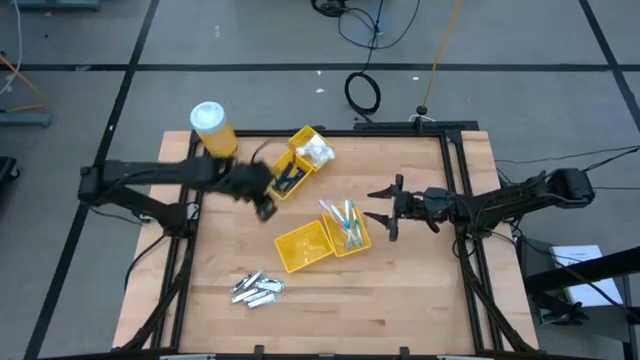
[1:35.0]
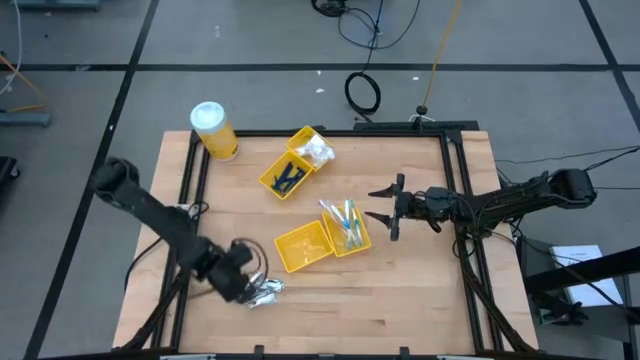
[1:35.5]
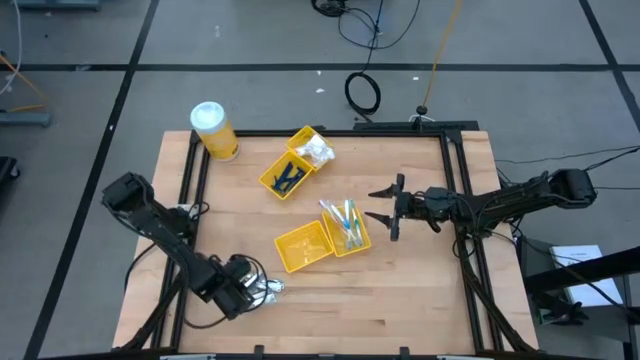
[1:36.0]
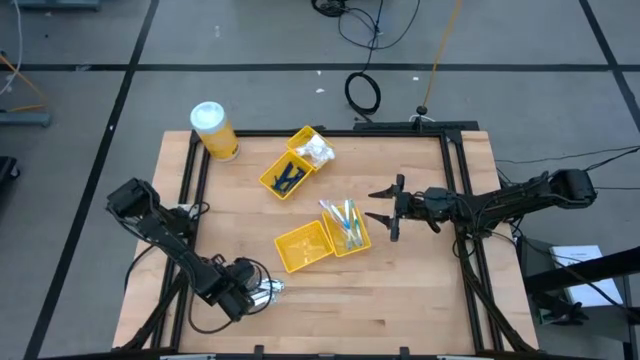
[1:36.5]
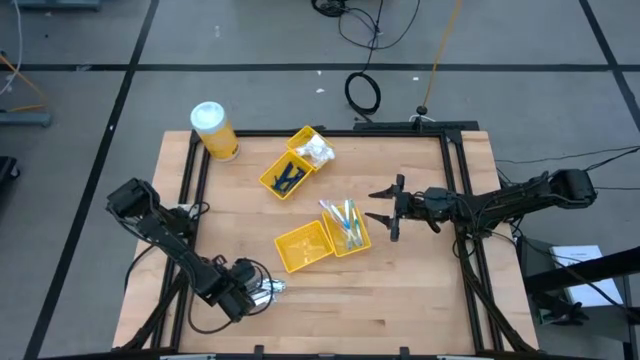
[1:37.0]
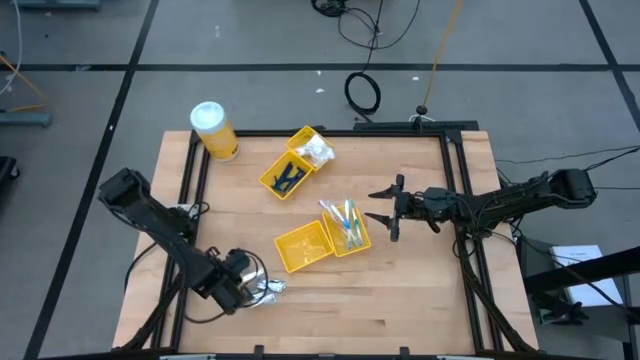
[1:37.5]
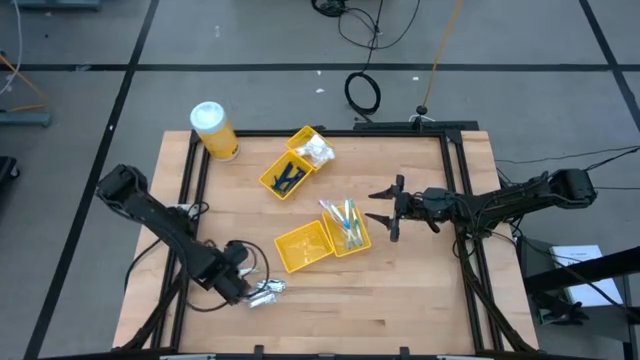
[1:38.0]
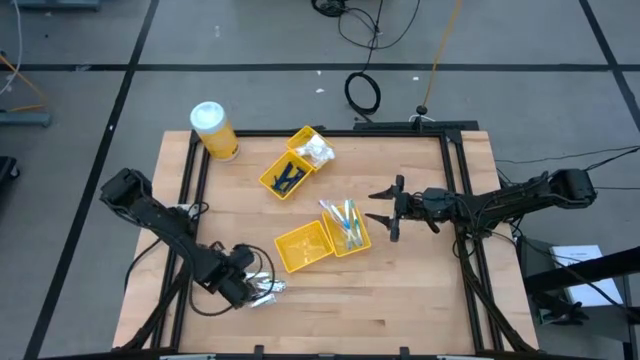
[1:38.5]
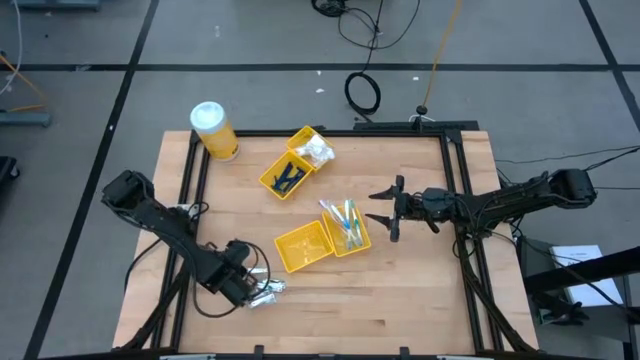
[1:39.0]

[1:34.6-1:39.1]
Task: Pick & Place Travel size toiletries
Put the silver nail cutter into the bottom left yellow basket

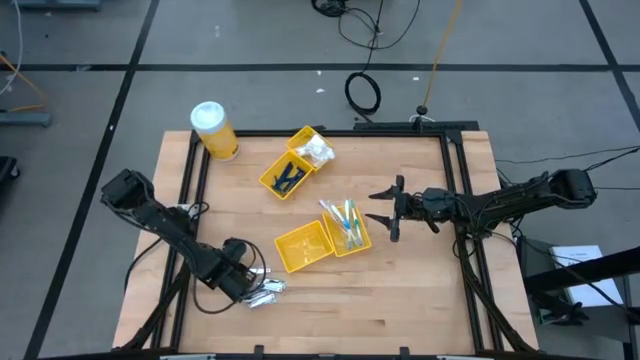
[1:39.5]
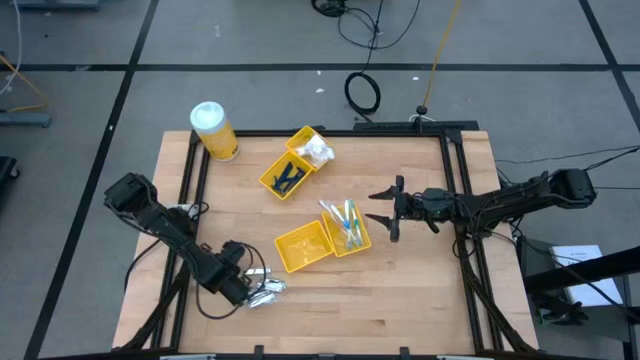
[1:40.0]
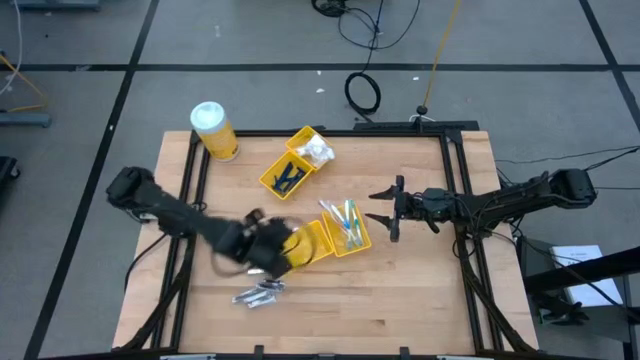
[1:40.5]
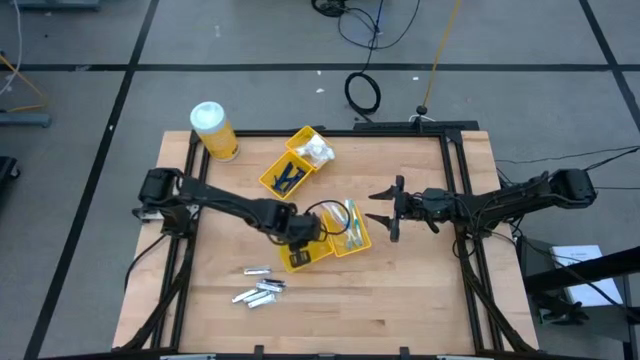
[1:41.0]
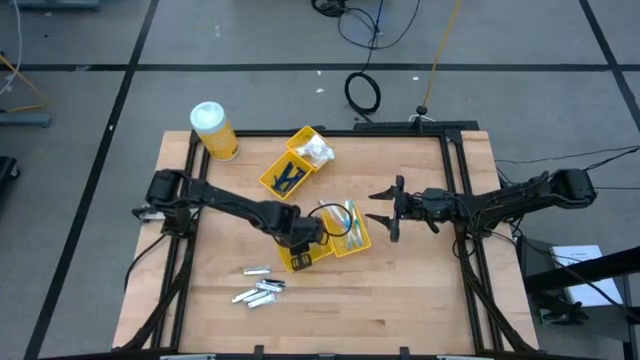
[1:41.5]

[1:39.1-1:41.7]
Put the silver nail cutter into the bottom left yellow basket

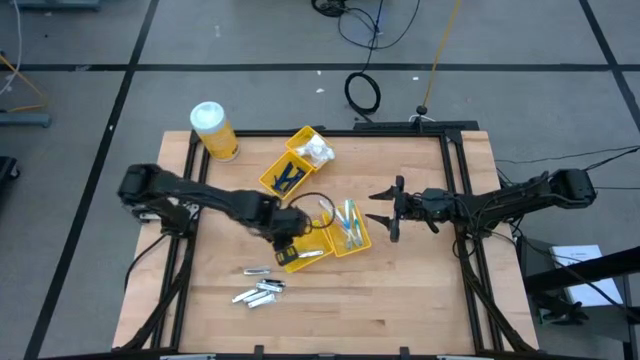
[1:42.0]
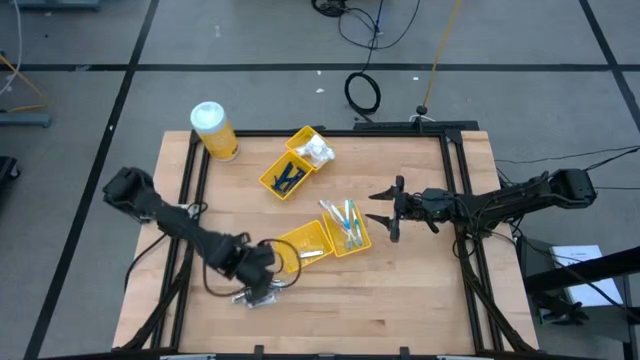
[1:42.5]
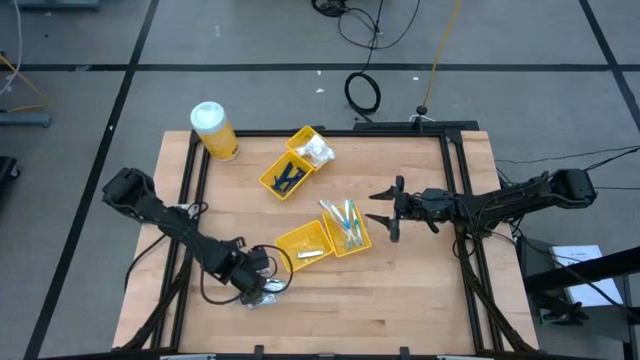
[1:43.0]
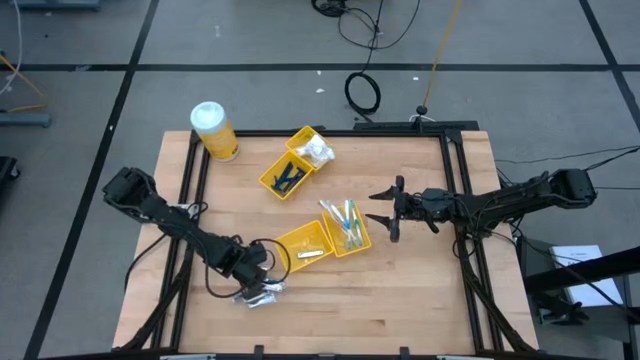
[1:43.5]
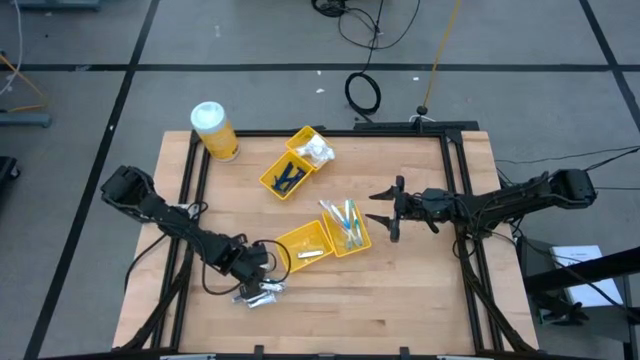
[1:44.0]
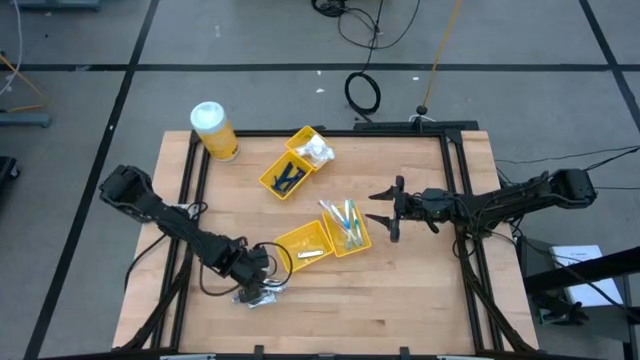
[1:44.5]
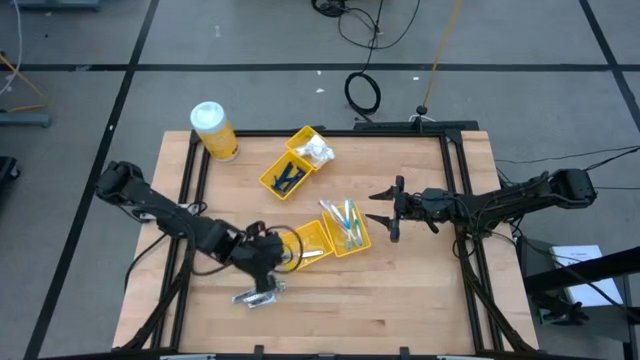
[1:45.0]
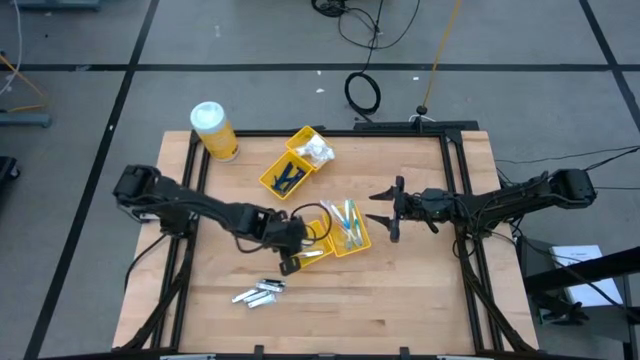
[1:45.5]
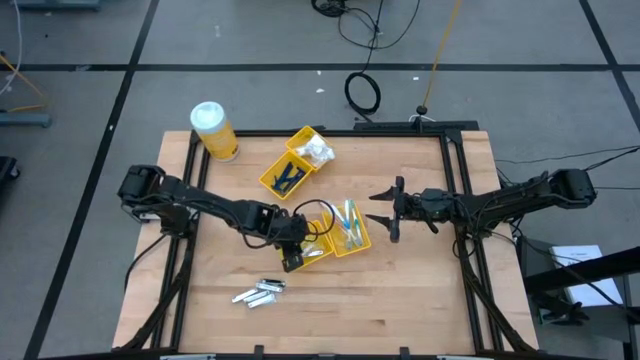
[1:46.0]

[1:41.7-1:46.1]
Put the silver nail cutter into the bottom left yellow basket

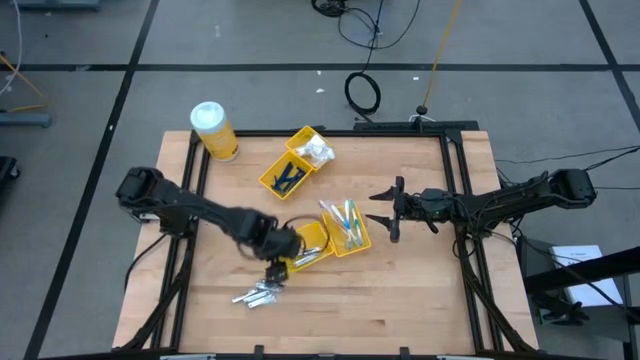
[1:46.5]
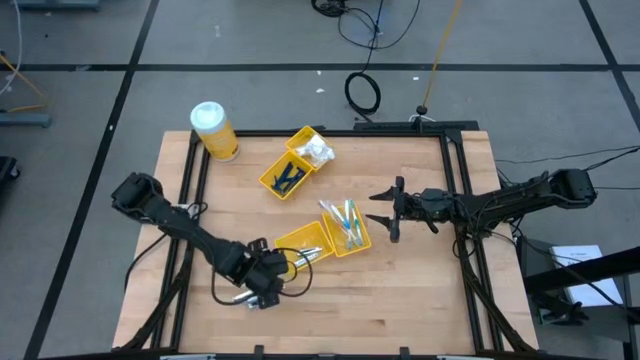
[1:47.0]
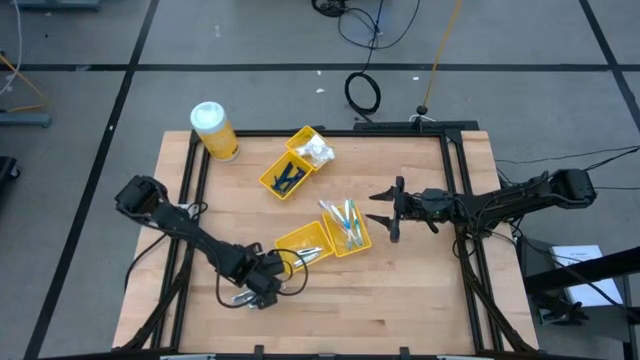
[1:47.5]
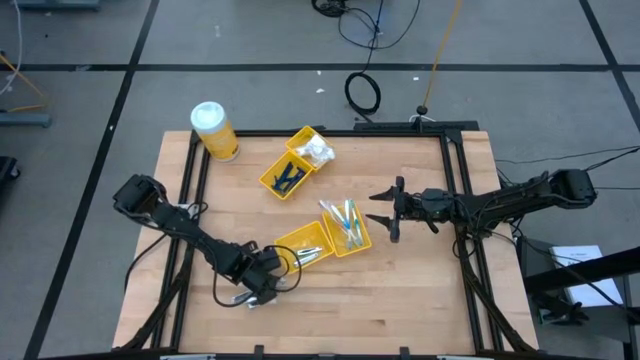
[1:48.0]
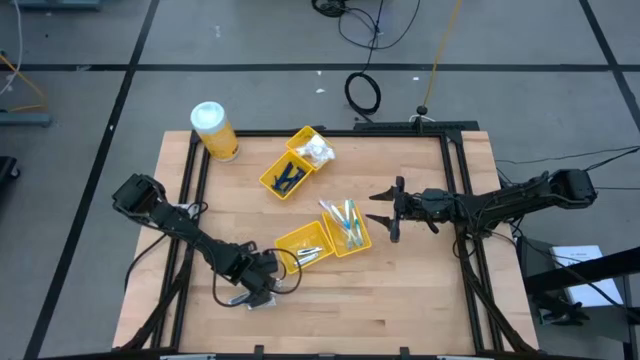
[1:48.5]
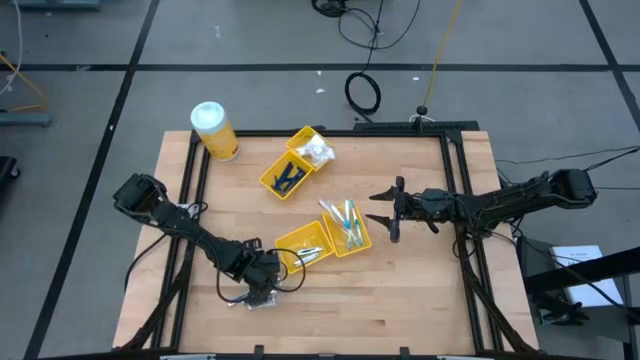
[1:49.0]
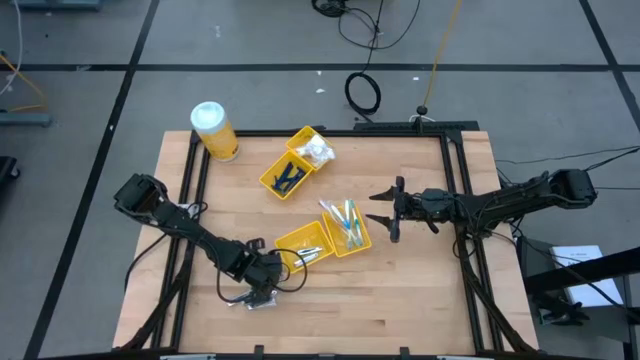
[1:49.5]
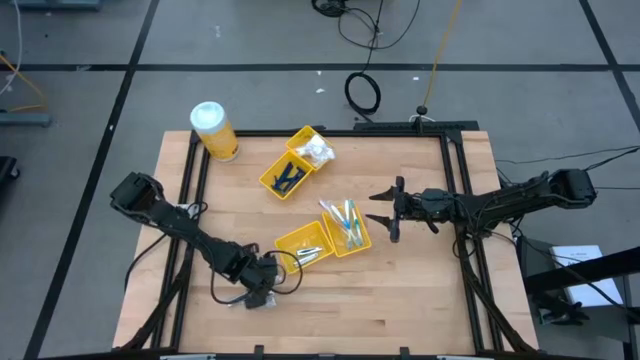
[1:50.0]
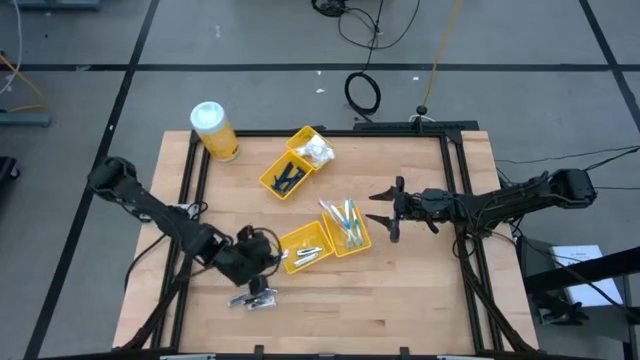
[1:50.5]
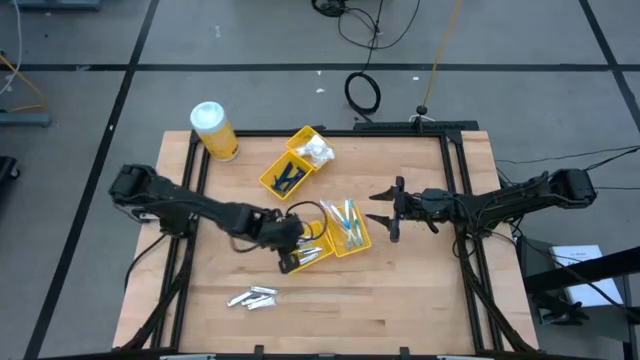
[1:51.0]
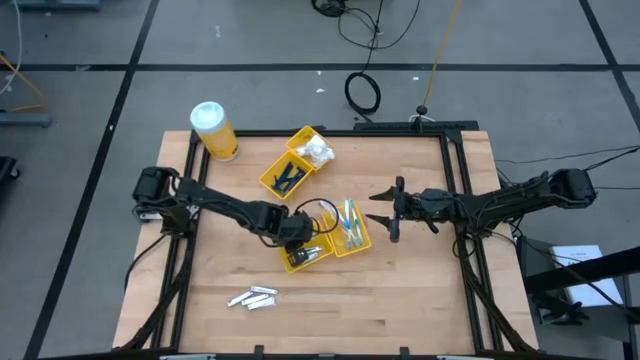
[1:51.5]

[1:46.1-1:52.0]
Put the silver nail cutter into the bottom left yellow basket

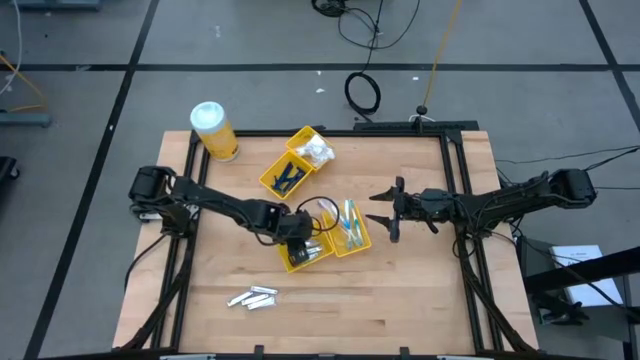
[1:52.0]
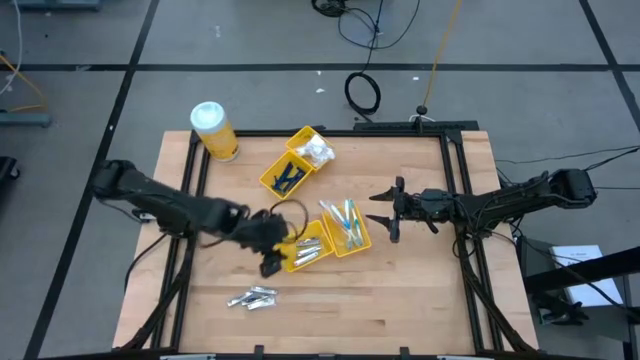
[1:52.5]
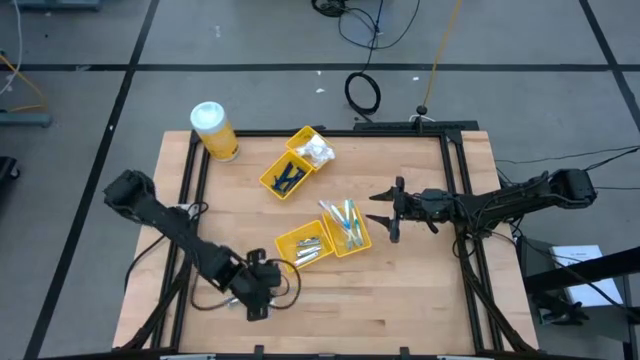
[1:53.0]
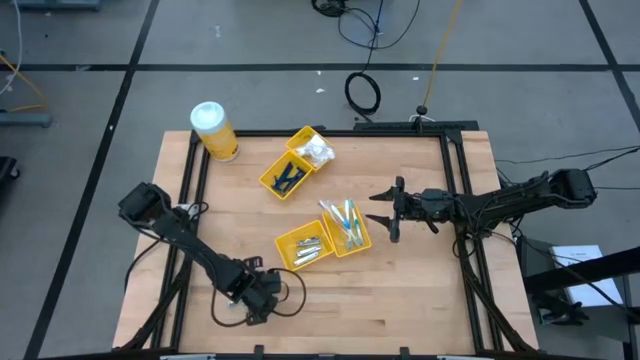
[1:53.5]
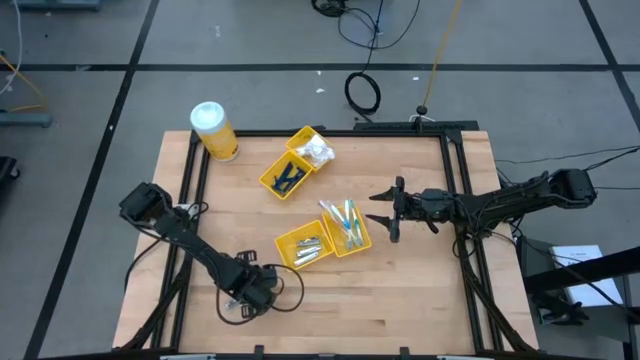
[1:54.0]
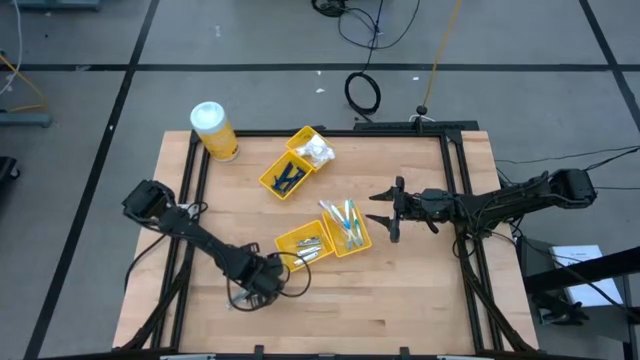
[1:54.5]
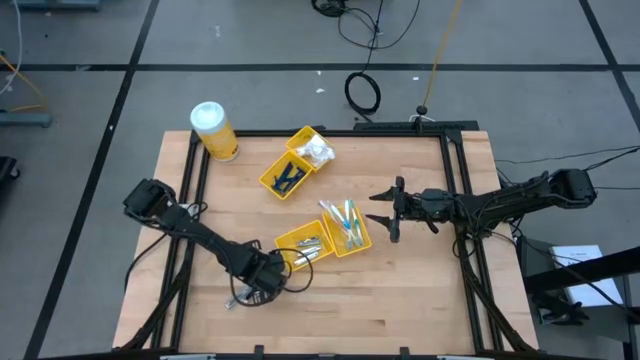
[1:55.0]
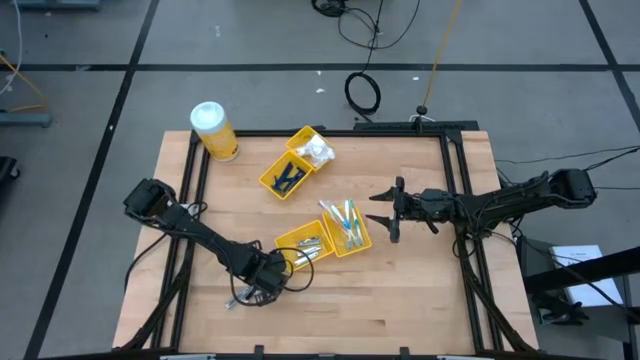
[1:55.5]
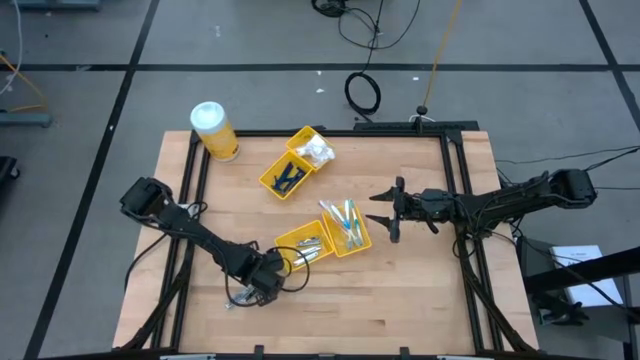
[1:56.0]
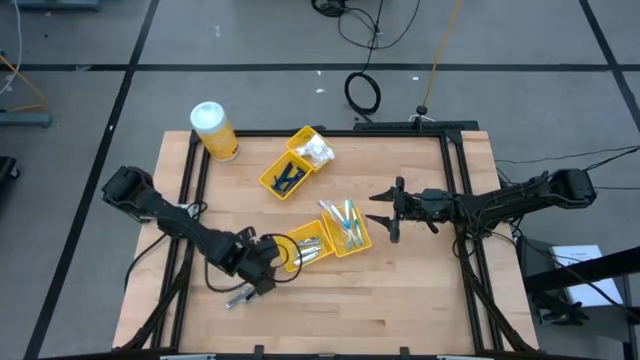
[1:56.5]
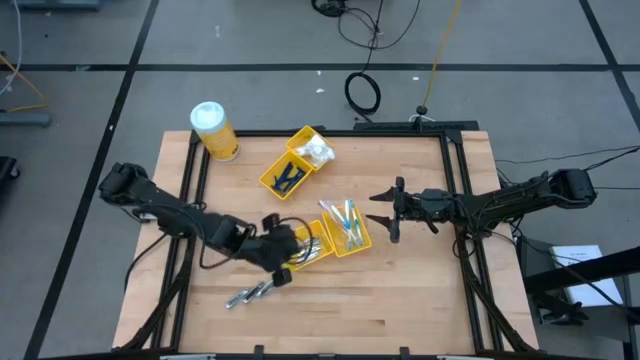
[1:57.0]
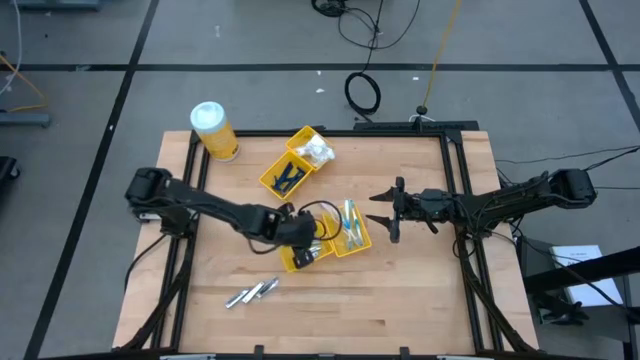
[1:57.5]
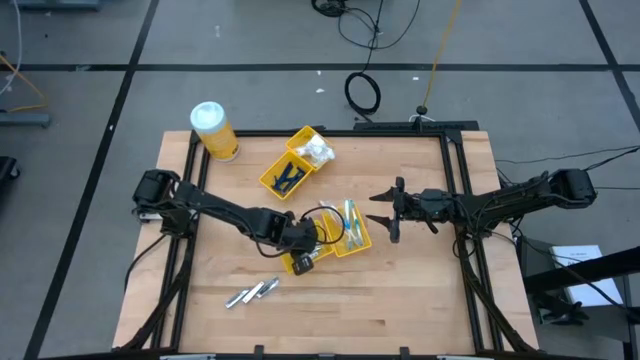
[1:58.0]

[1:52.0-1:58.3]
Put the silver nail cutter into the bottom left yellow basket
